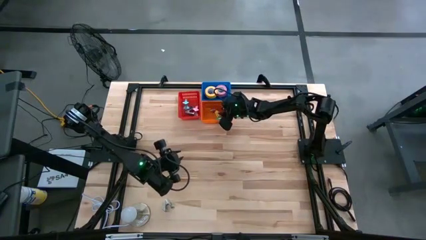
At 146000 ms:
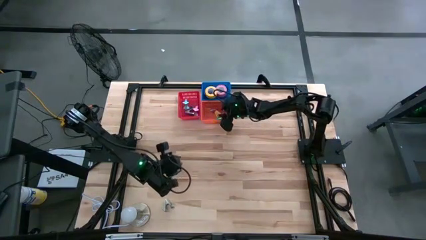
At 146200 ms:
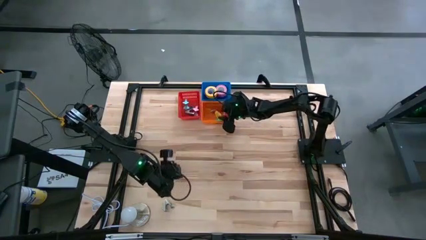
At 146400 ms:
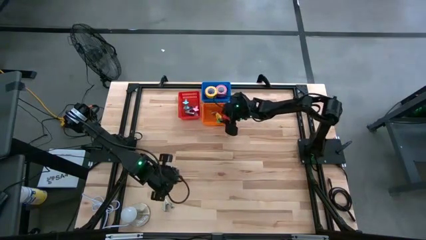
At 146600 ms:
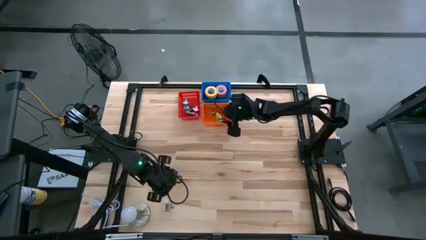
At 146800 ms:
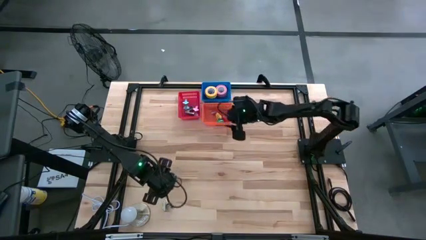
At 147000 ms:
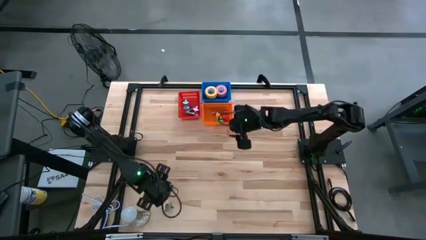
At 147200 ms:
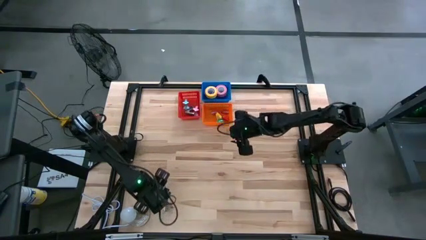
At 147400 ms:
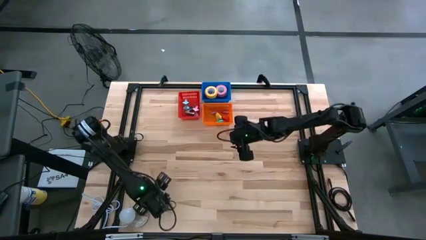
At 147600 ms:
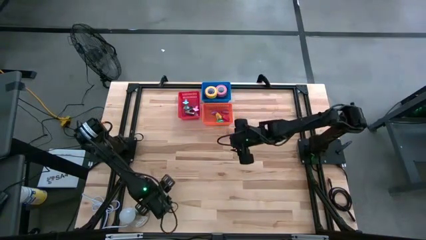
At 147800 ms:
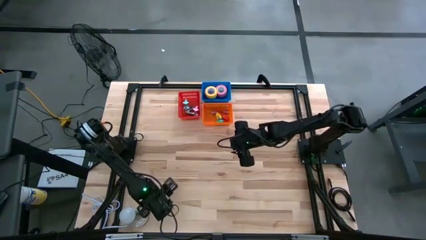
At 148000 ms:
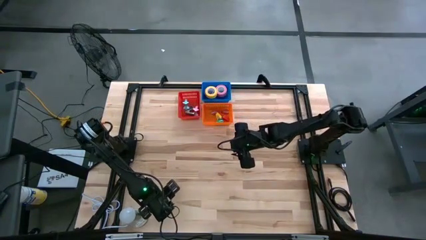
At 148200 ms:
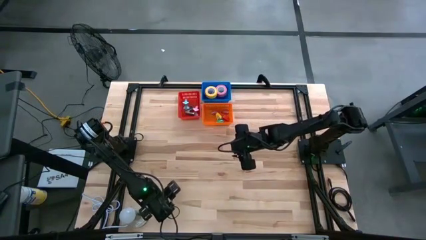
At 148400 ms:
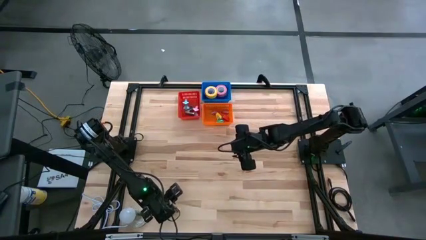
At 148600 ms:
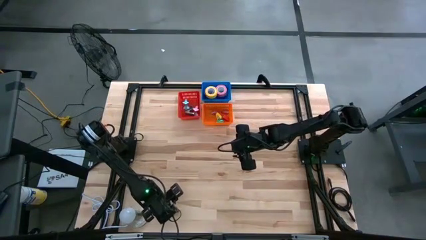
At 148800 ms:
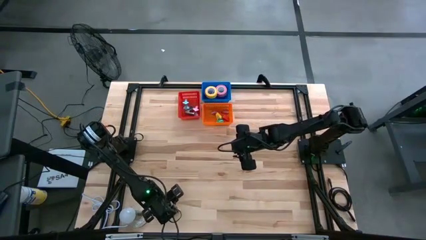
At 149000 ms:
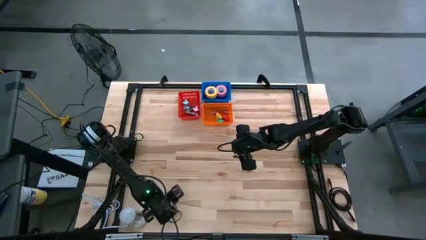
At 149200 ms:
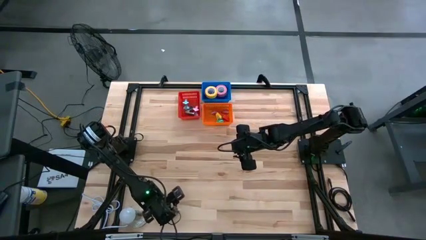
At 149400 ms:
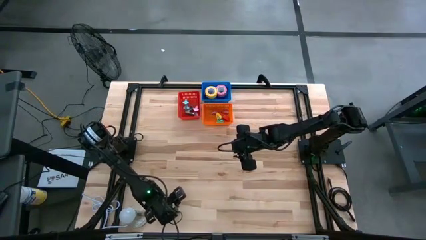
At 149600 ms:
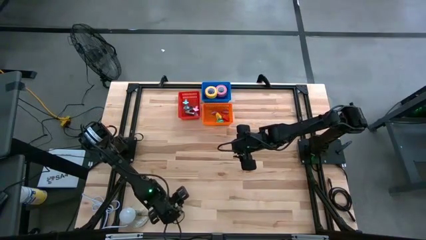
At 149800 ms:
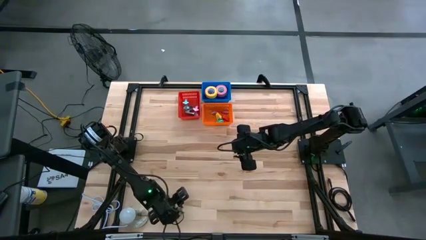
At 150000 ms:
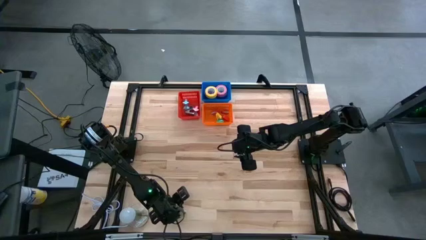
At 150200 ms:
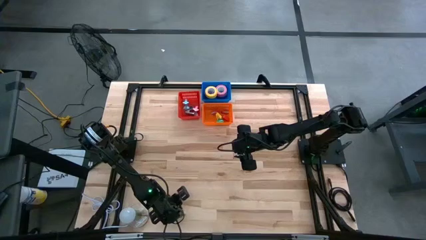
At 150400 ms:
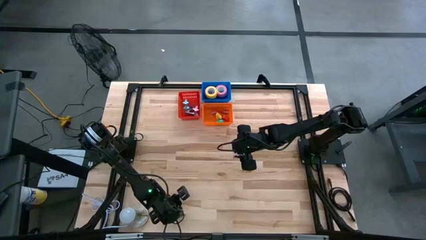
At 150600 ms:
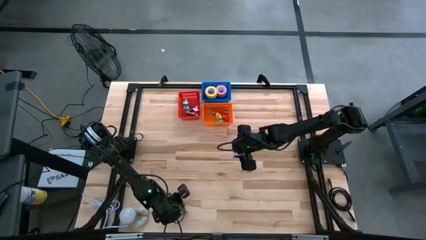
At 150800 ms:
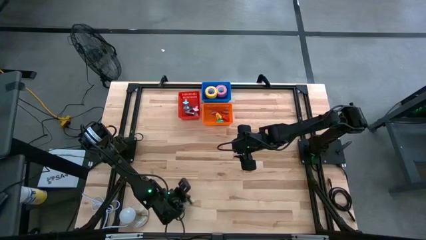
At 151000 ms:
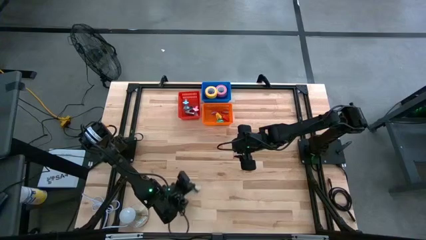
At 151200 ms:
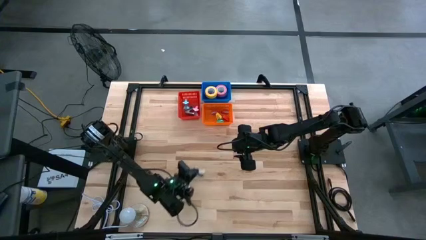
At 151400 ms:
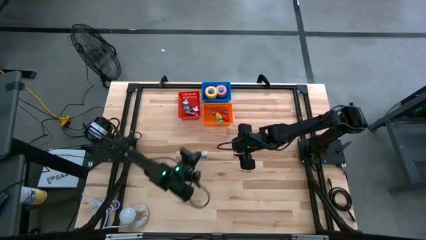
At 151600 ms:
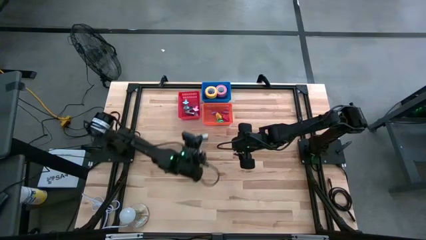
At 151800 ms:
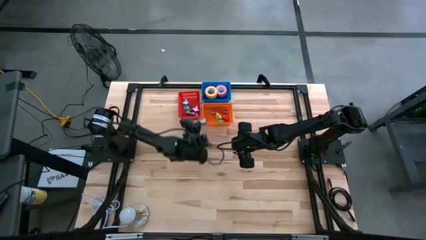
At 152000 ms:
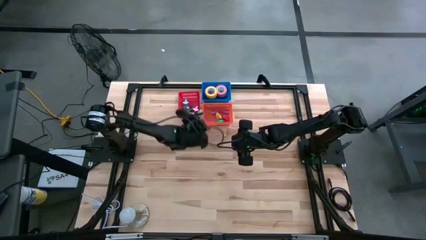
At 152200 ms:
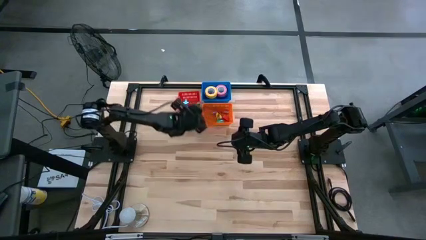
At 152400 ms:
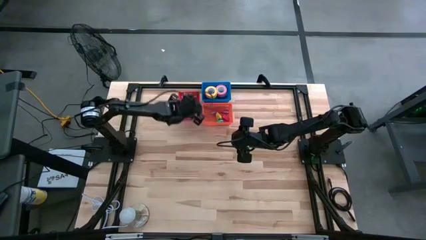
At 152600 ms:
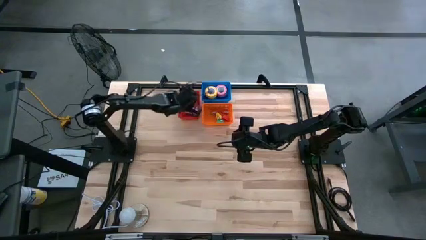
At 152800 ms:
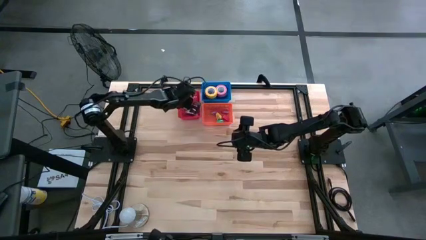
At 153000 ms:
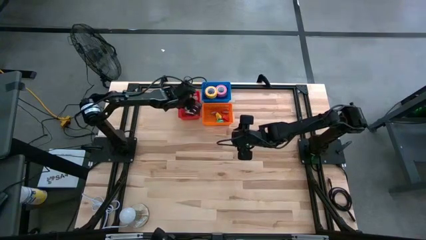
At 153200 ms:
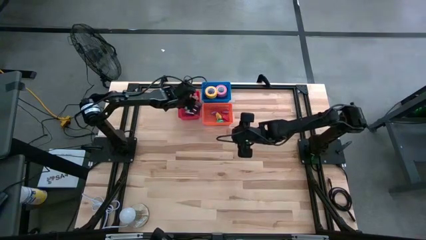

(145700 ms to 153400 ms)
Task: Pick and place Stapler, Stapler remover, tape
Put the white staple remover into the red bin

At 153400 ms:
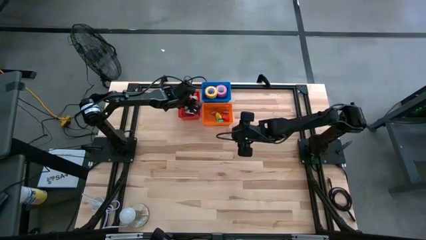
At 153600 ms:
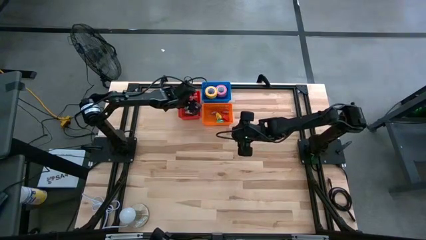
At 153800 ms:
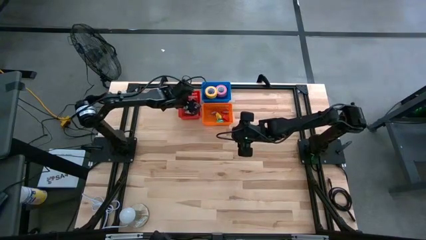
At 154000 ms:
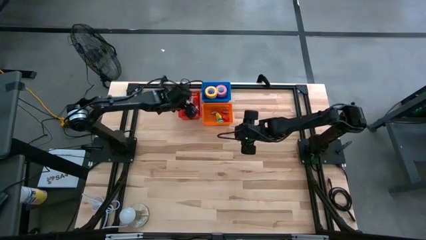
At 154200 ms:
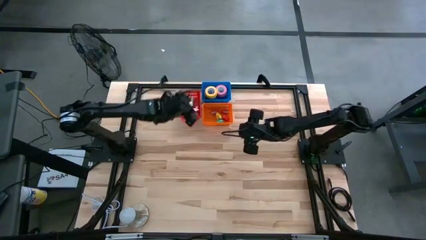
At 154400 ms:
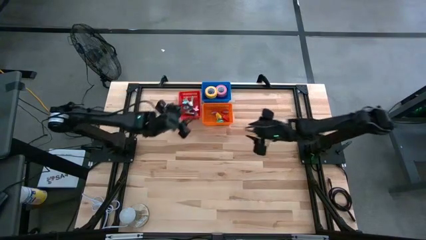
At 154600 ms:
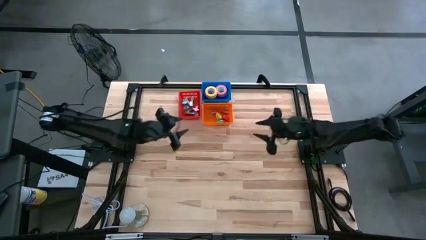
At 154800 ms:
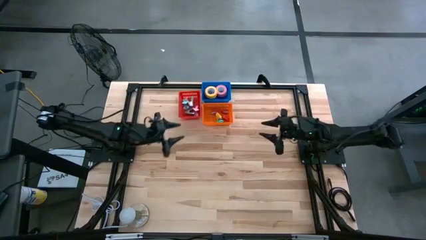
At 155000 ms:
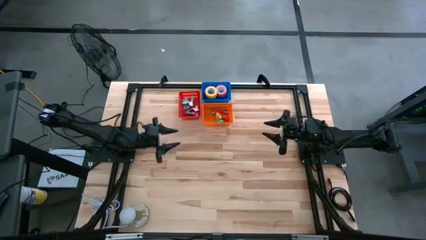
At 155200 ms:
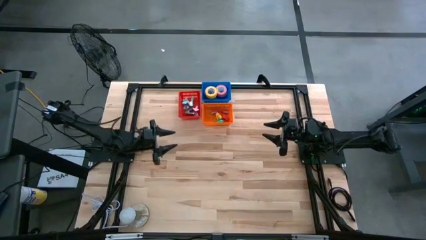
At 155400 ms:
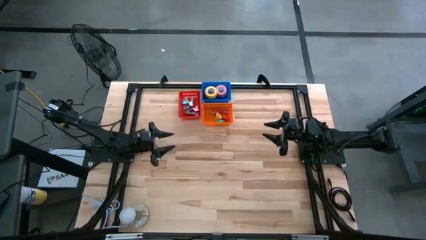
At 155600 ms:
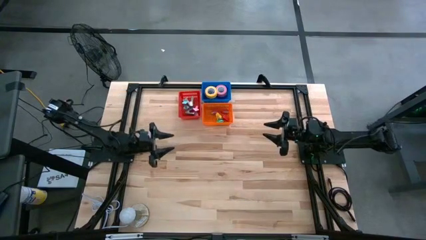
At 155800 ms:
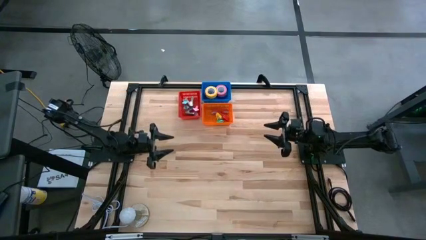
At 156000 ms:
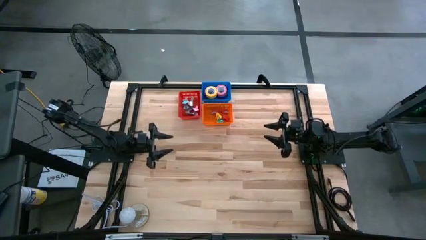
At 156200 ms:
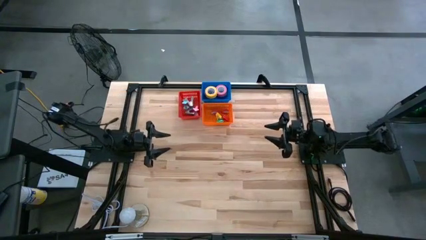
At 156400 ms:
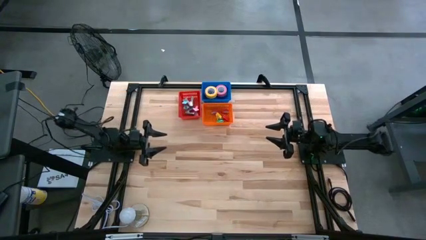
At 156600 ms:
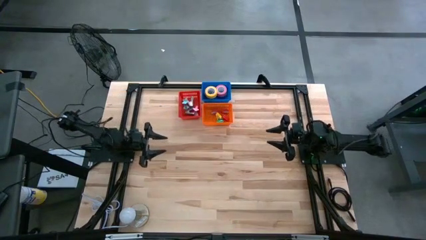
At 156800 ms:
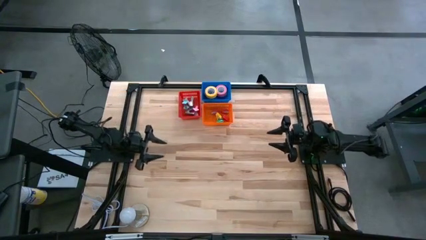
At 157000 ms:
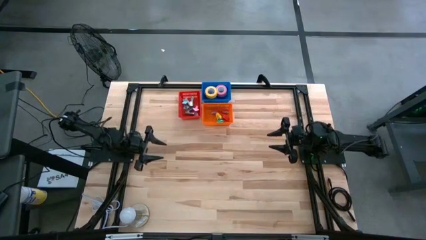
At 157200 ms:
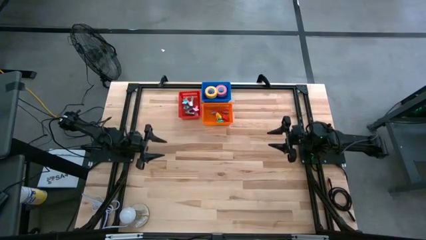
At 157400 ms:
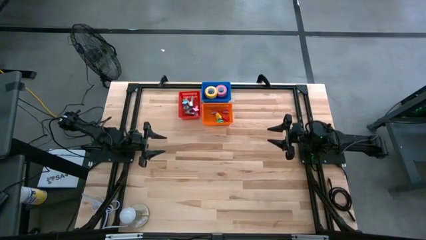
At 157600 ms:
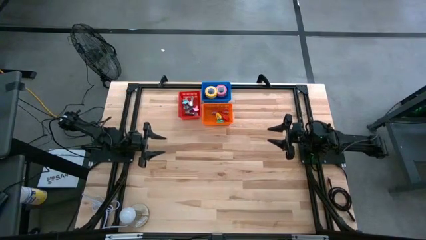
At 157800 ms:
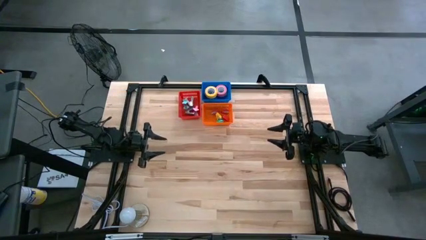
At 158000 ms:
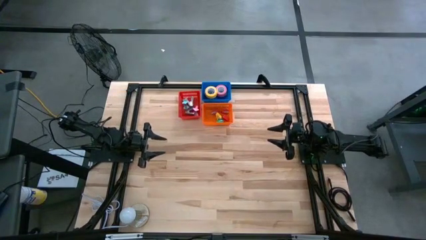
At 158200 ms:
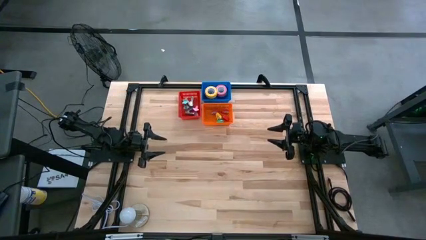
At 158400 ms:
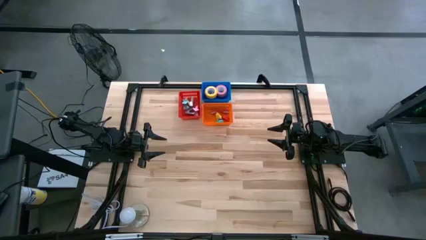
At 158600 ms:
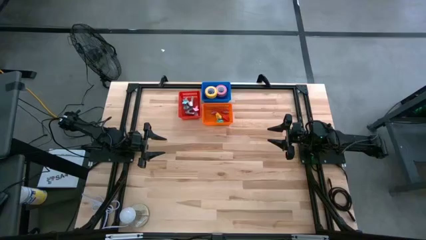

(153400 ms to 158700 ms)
Return to Home Position

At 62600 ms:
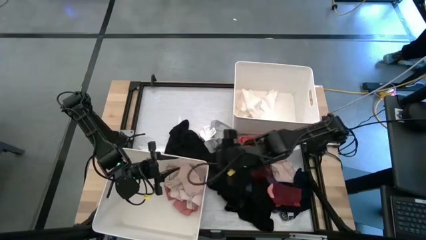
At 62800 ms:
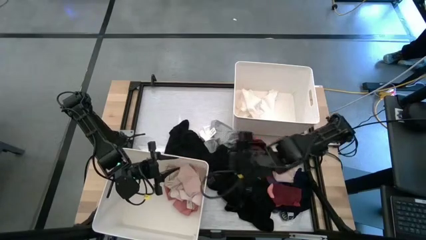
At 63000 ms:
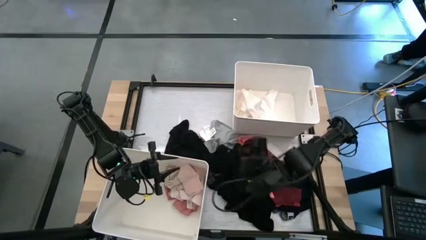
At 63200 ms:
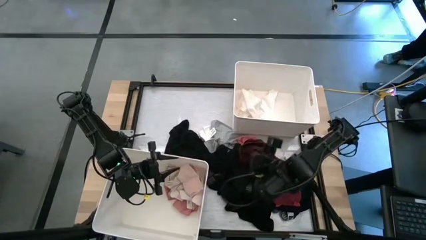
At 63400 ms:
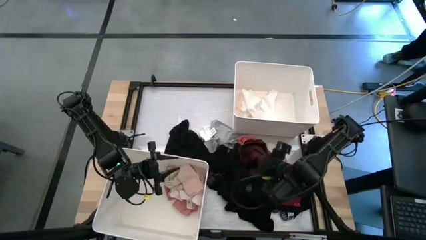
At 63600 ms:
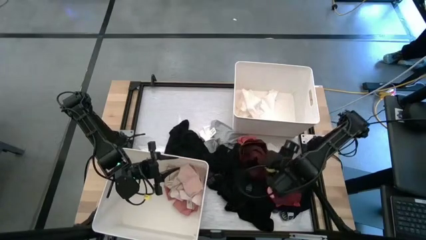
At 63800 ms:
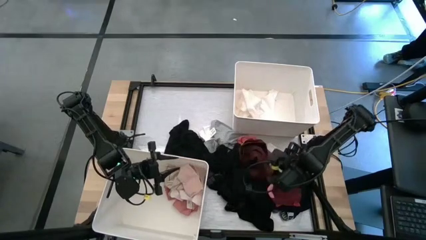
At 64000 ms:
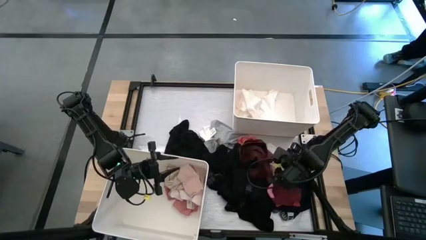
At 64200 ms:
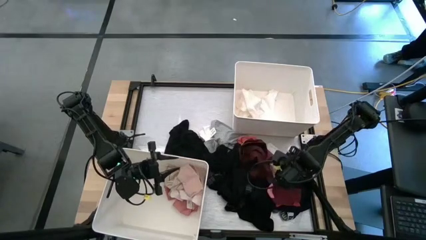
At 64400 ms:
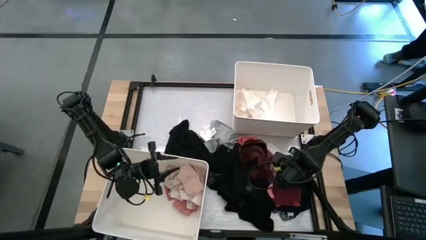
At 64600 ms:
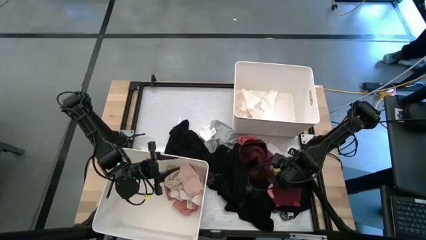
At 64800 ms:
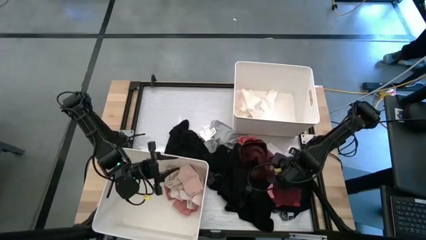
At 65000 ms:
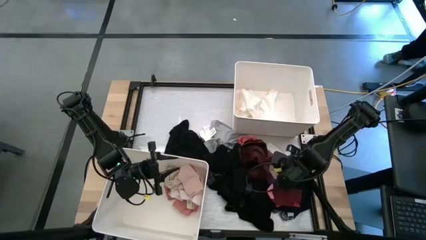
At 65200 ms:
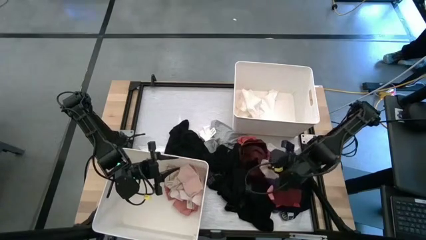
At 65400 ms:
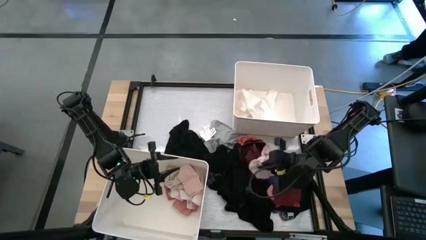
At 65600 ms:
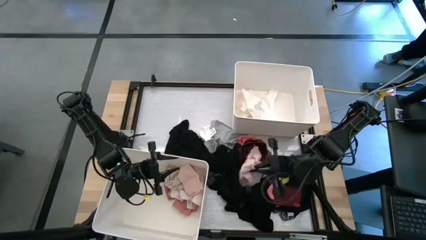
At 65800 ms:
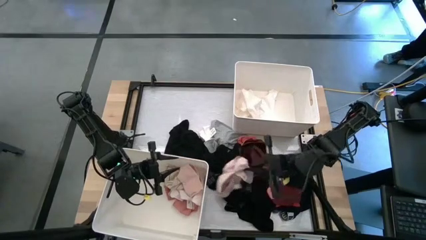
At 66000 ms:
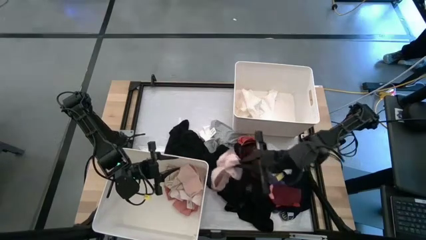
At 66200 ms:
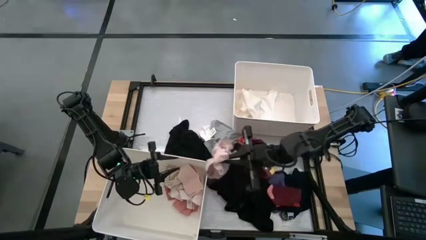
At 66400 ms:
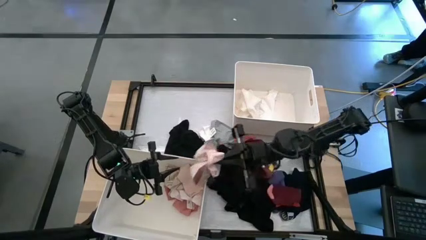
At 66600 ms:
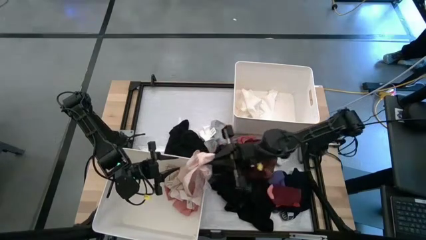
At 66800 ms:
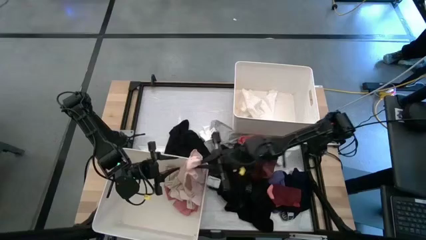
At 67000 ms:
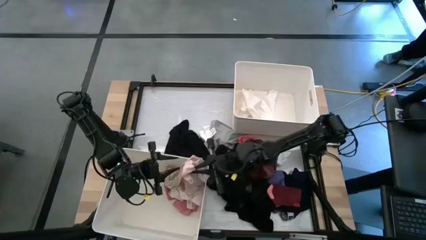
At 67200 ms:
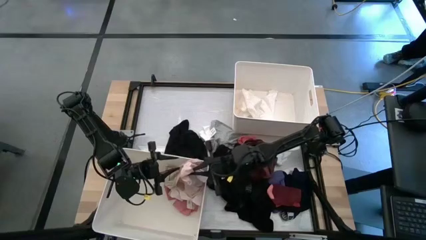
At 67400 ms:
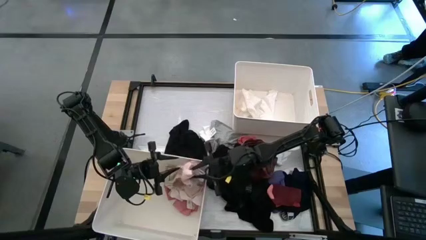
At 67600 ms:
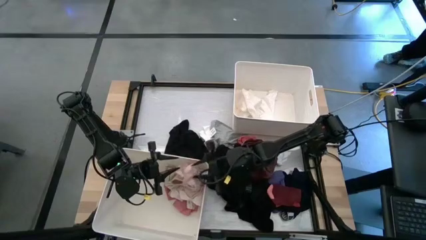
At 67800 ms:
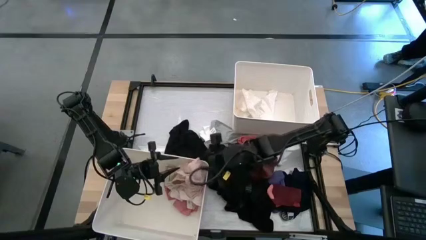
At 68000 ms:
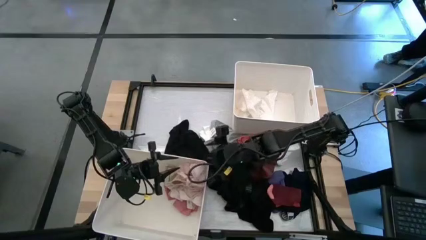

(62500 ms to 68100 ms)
Task: Sort clothes
Put the pink boxer into the bottom white bin
